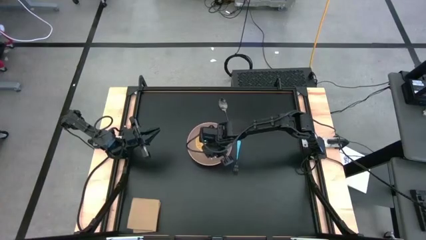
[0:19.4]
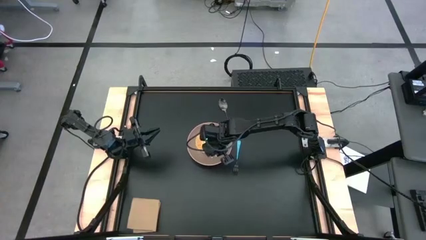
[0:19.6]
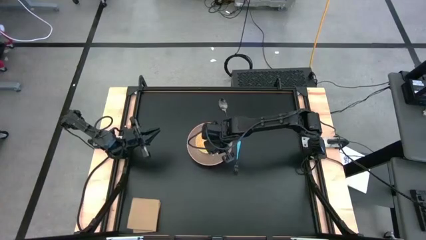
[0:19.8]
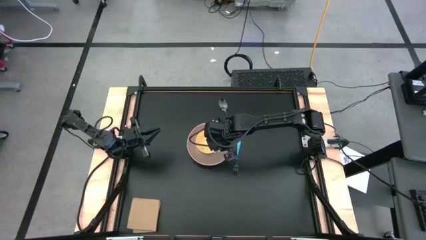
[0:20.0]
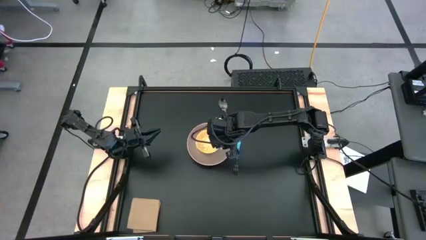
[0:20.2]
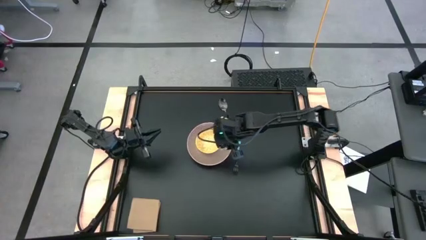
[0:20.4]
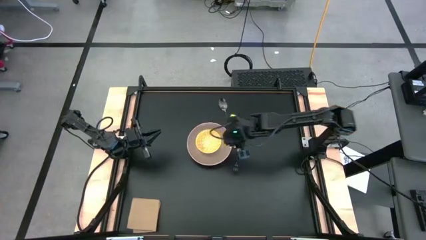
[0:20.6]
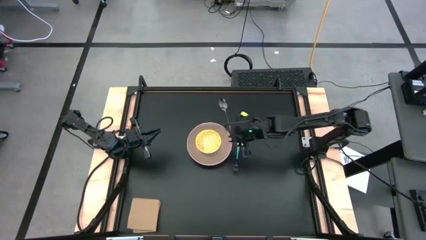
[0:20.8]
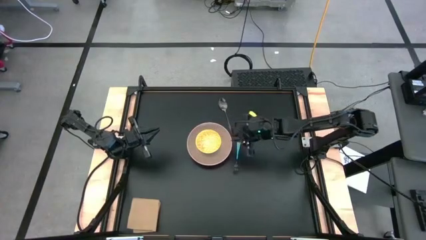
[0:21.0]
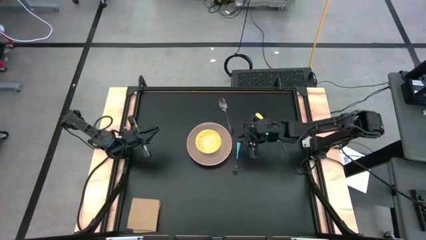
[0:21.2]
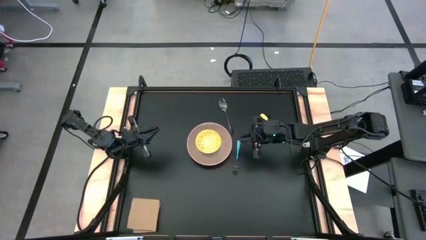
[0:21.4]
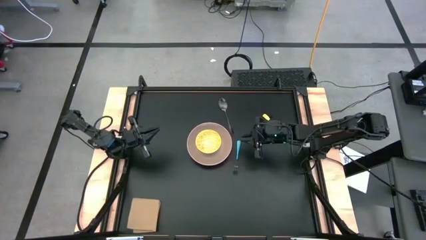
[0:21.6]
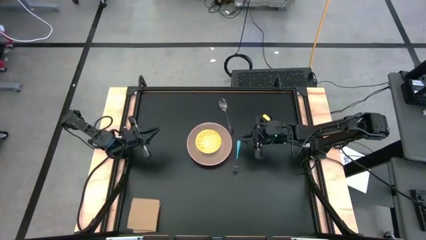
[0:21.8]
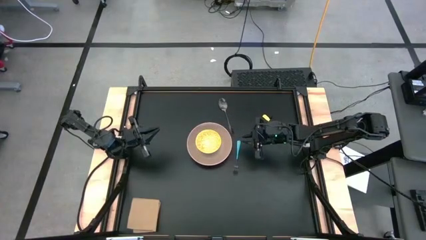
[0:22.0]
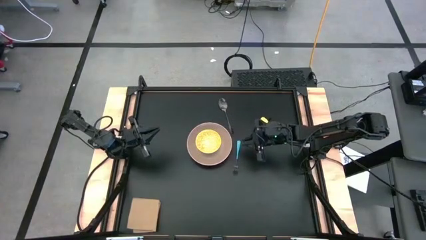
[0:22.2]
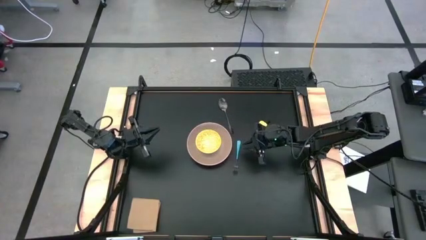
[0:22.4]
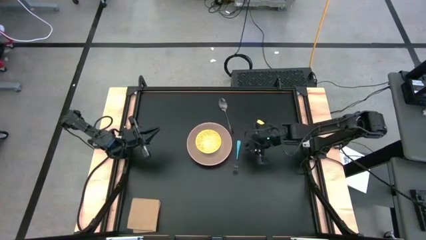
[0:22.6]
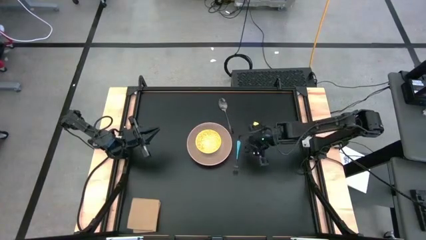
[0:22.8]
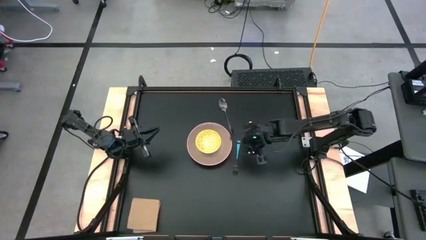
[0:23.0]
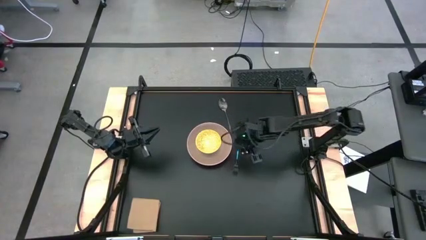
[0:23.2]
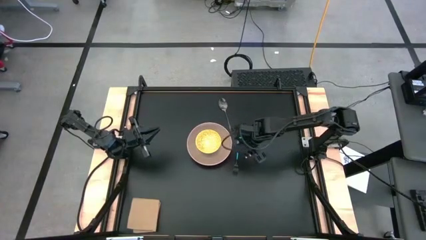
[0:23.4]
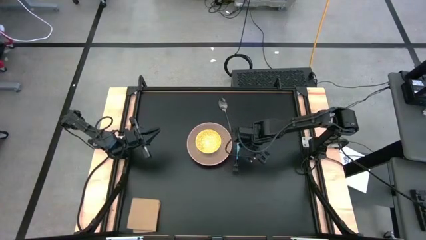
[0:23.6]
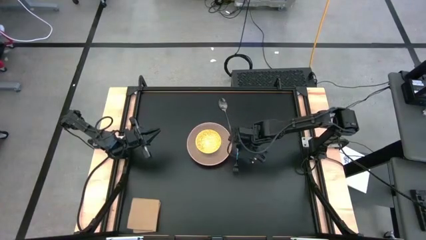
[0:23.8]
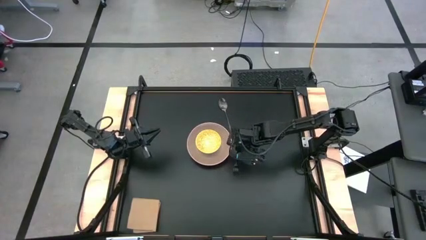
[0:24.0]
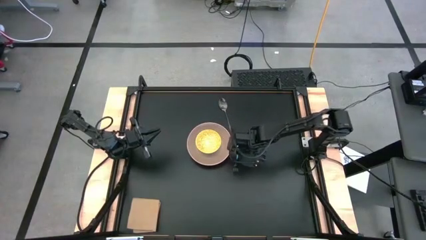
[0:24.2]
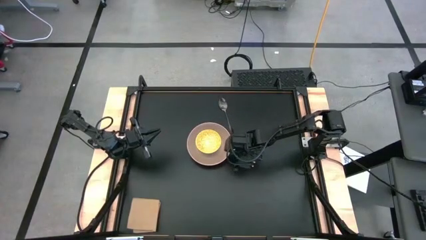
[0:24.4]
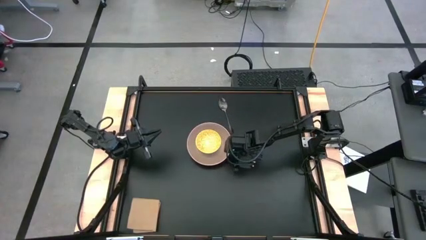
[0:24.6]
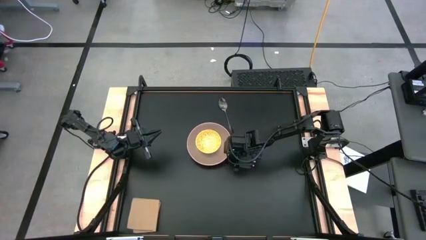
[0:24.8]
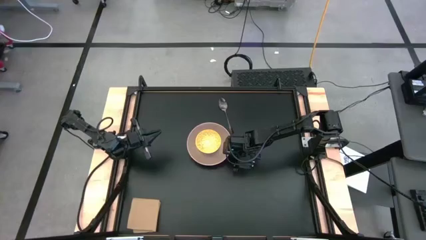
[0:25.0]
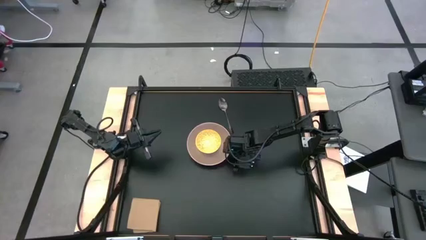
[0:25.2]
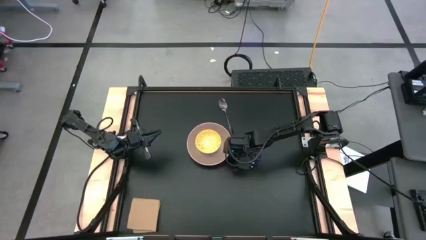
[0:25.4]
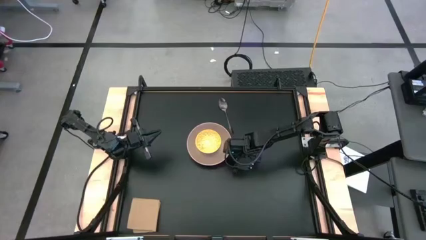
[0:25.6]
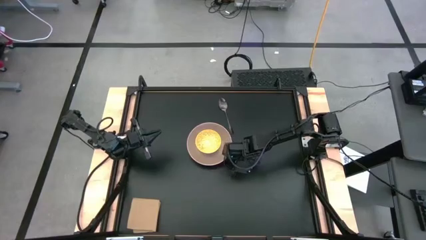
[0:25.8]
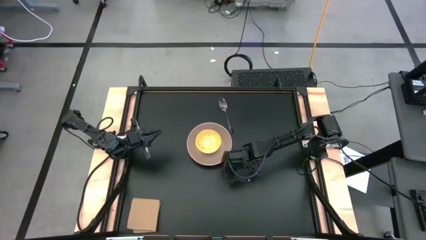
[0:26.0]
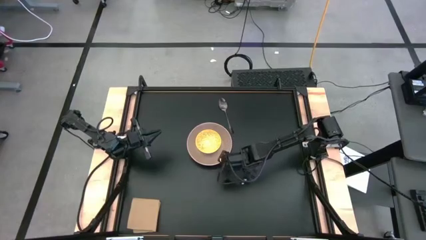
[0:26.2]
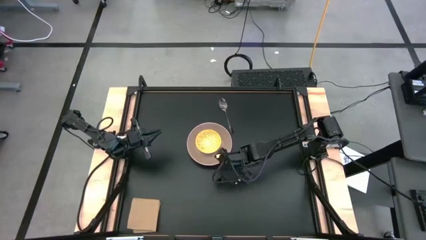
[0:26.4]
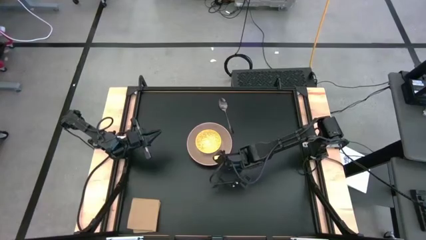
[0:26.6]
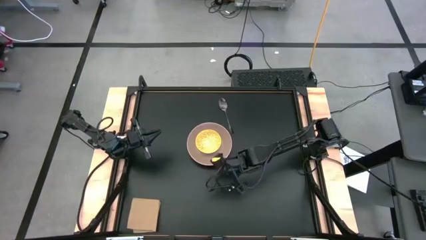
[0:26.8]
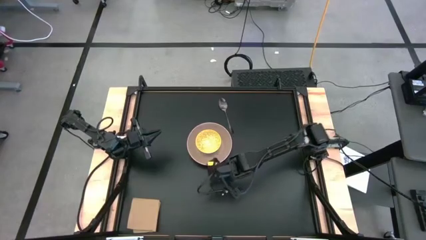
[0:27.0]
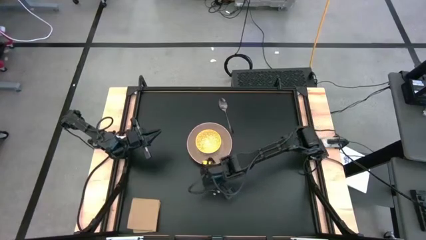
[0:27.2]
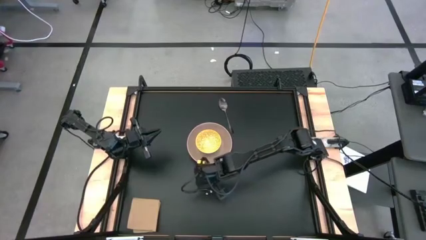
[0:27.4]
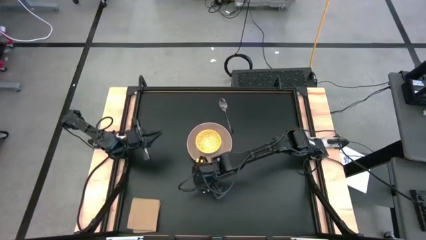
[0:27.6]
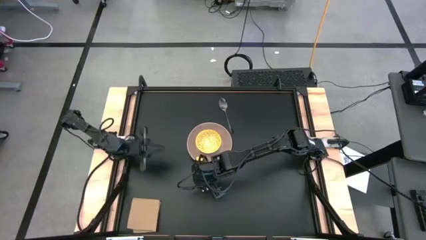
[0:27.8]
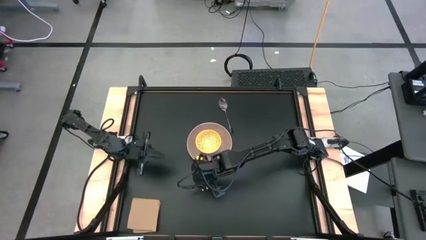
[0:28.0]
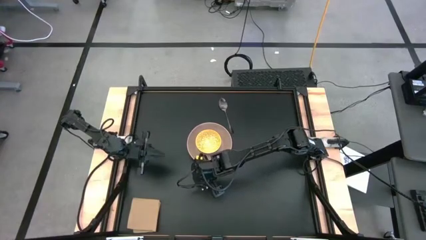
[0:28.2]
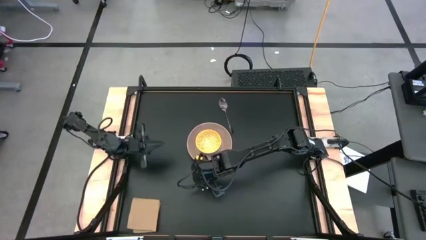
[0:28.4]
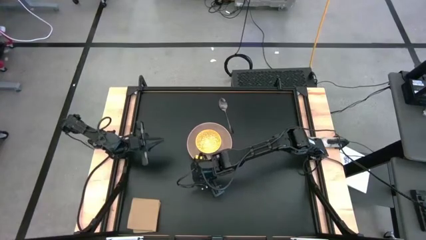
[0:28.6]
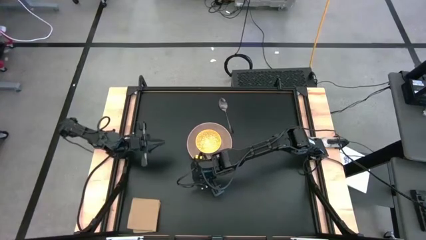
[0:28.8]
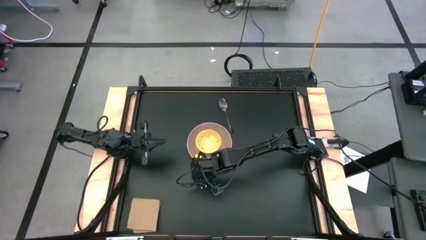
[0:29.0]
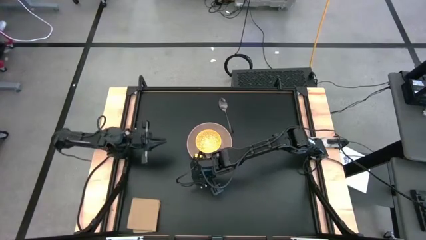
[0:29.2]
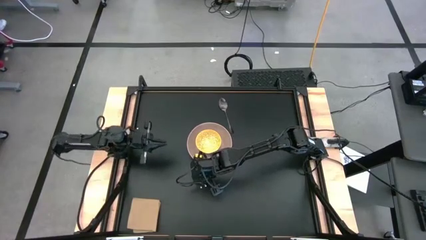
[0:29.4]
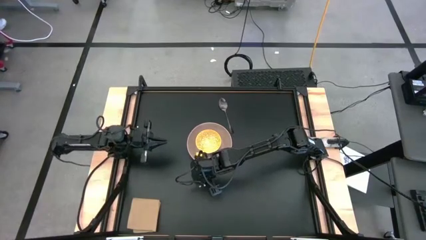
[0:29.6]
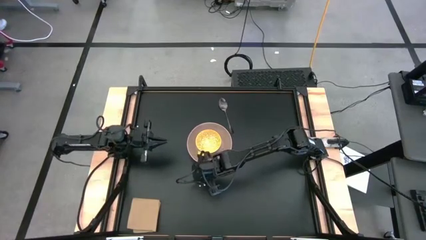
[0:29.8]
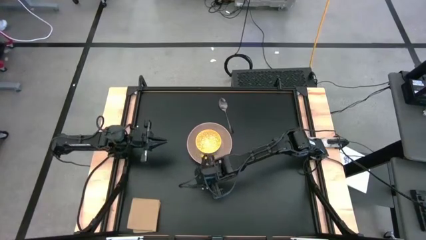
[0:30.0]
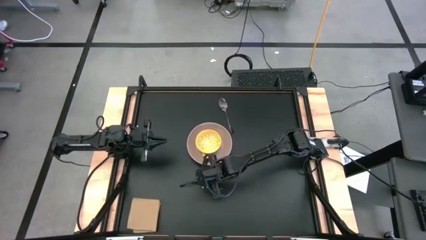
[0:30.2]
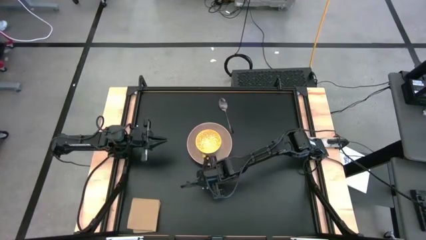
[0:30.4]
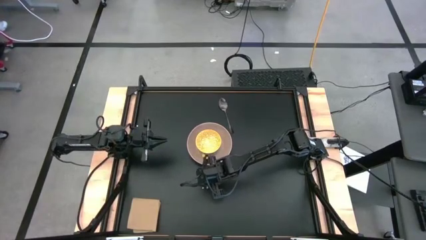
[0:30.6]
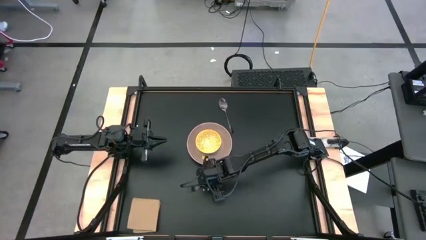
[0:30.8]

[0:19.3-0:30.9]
Task: Set table place
Move the blue fork from the right side of the plate to the center of the table
